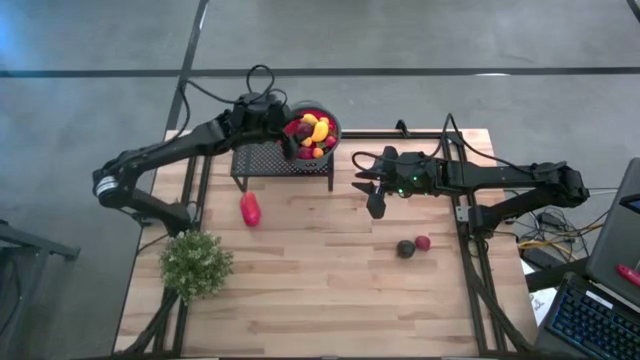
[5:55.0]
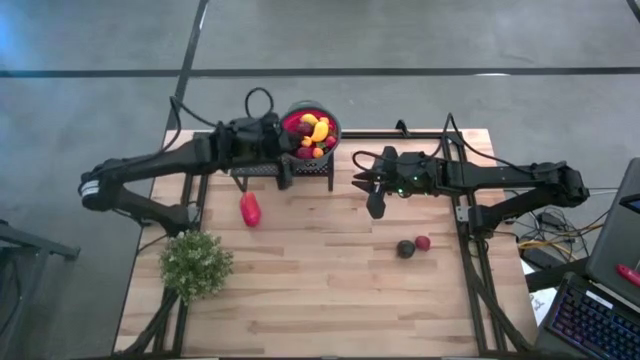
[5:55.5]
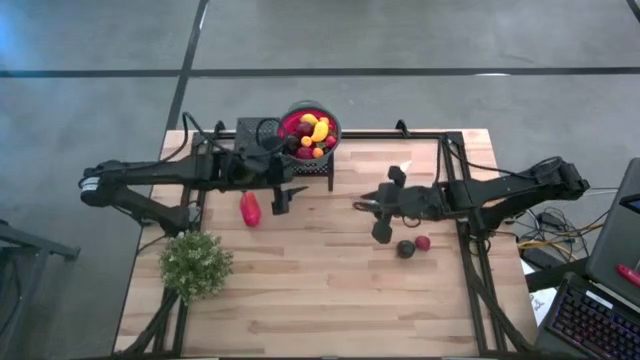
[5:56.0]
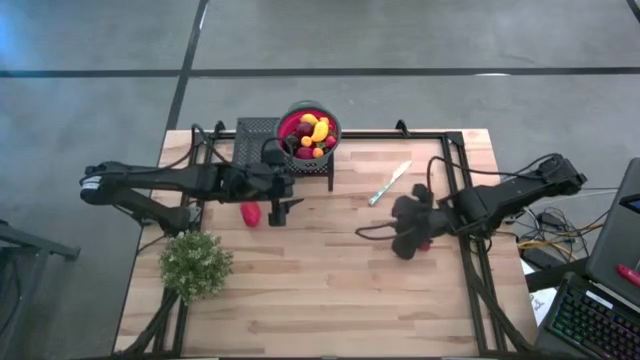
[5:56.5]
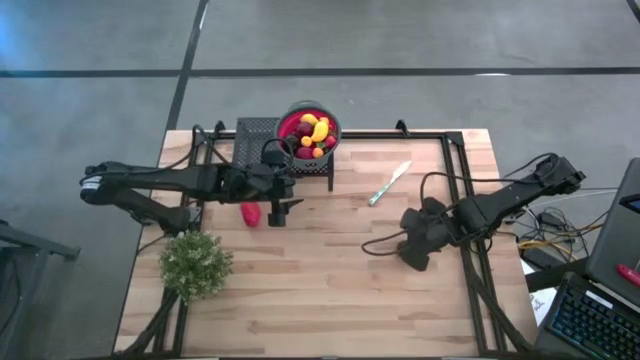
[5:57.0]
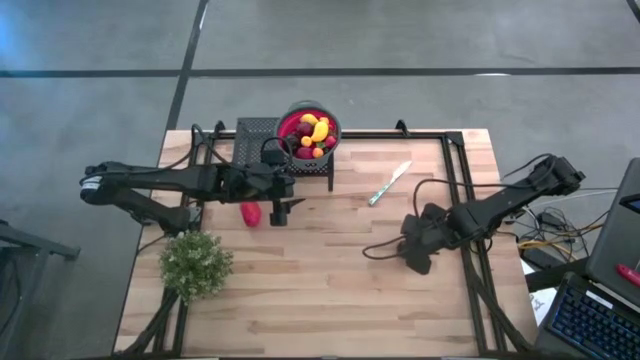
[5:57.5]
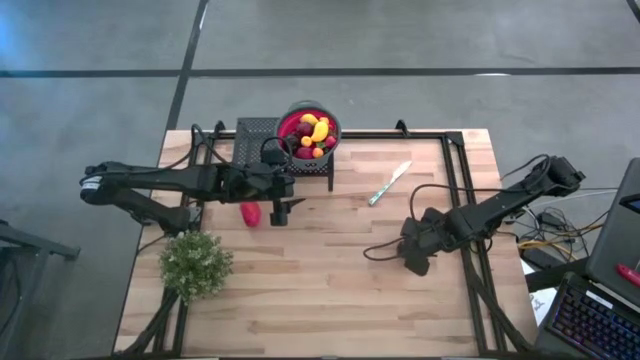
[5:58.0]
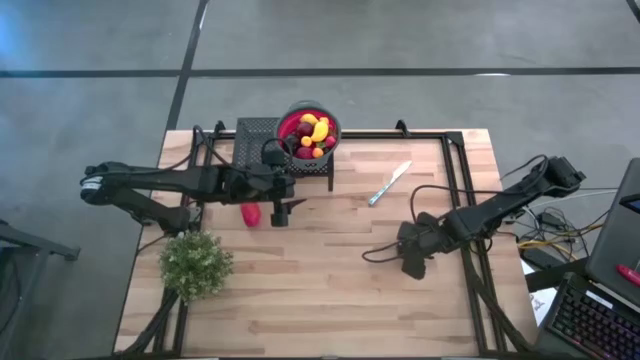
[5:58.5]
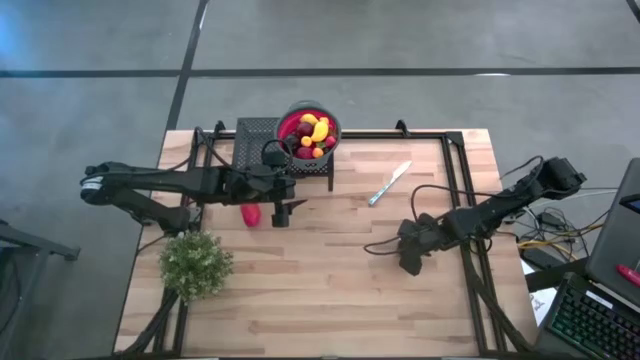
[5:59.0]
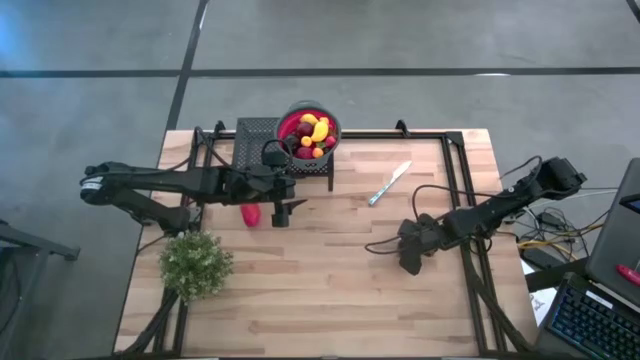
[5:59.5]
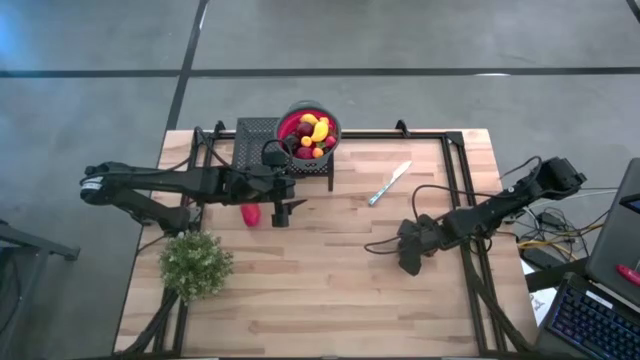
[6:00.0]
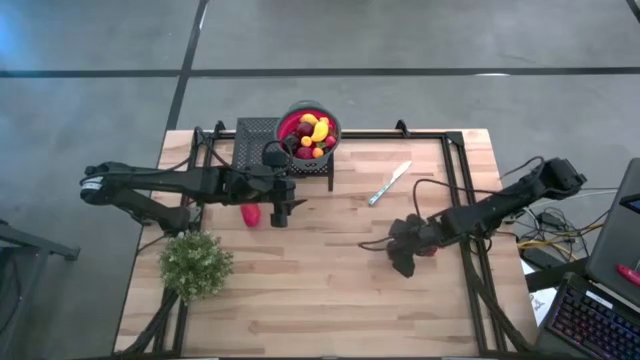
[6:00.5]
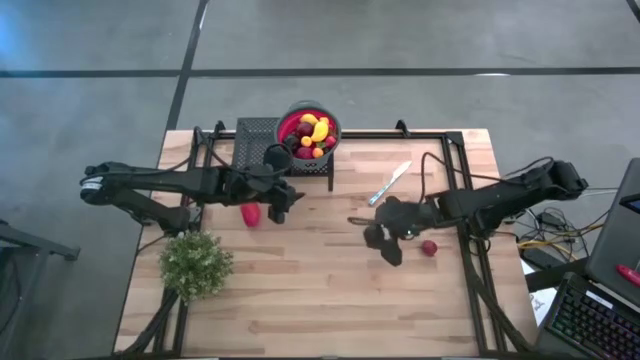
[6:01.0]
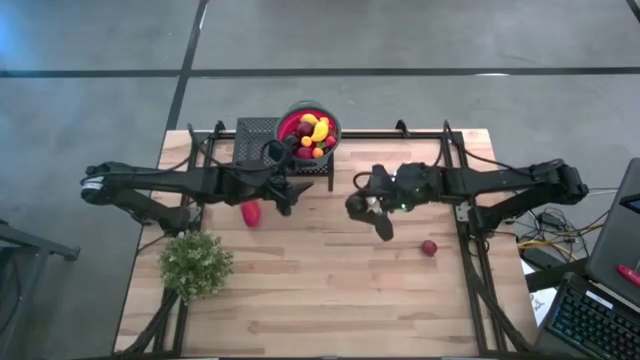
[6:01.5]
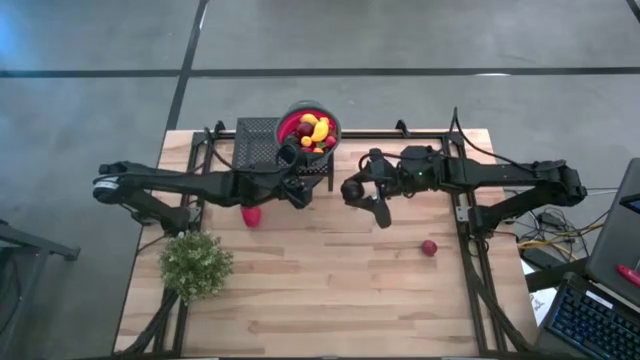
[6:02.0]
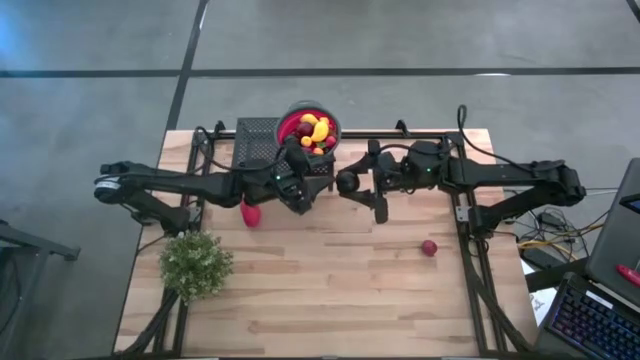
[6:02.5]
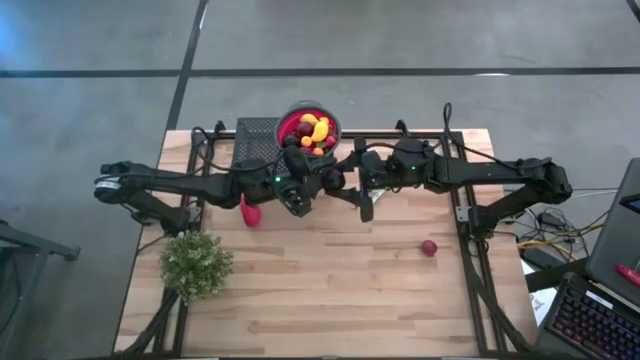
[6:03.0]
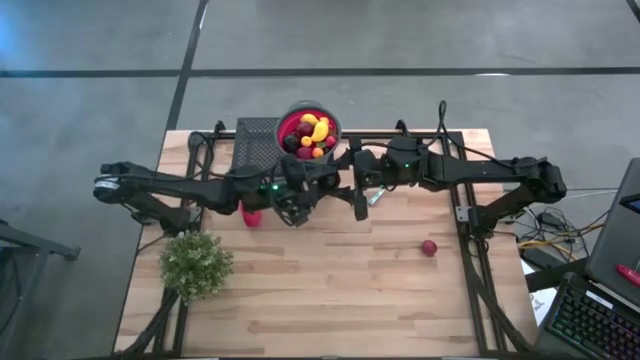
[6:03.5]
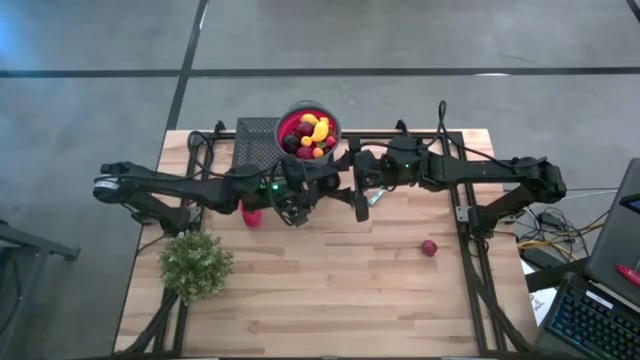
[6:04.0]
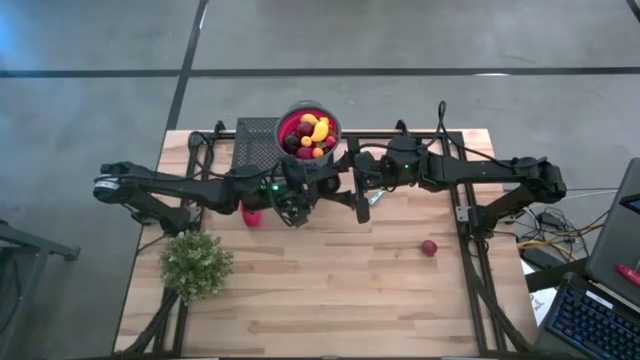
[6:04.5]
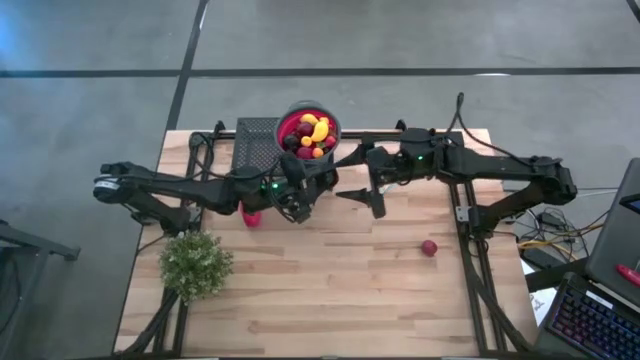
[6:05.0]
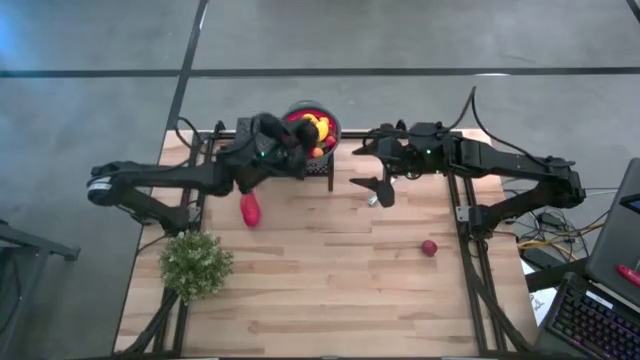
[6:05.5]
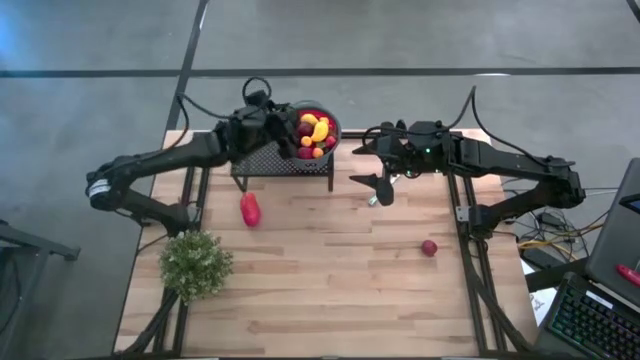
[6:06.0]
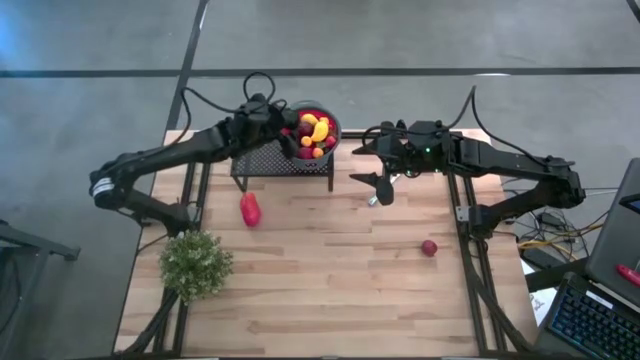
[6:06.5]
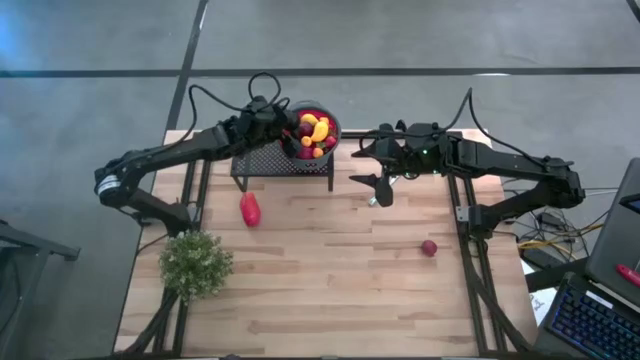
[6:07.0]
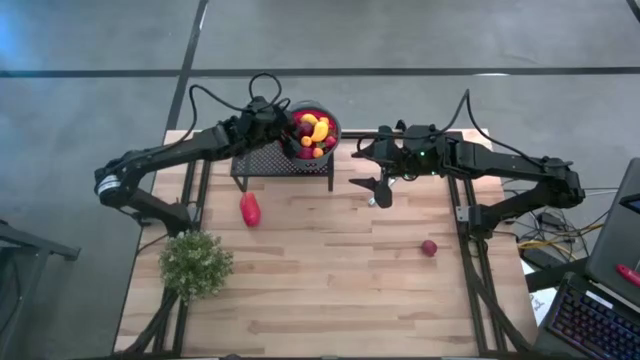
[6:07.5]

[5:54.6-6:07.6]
Task: Pick & Place Fruit
Put the black plum into the red gray strainer bowl on the shelf

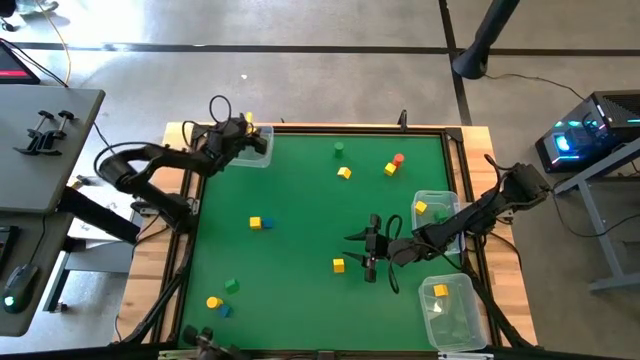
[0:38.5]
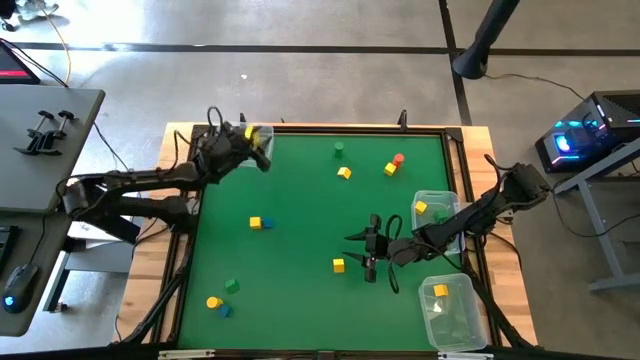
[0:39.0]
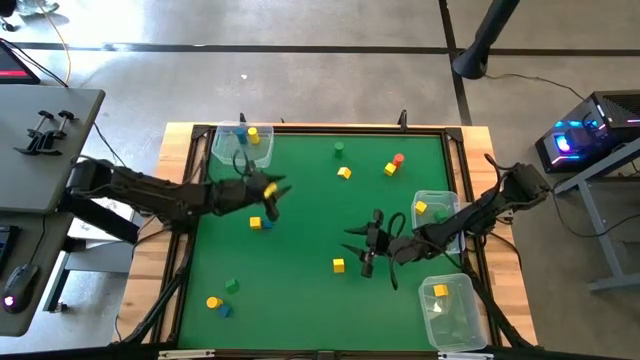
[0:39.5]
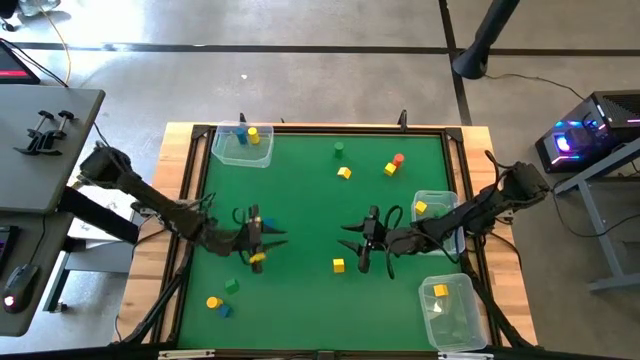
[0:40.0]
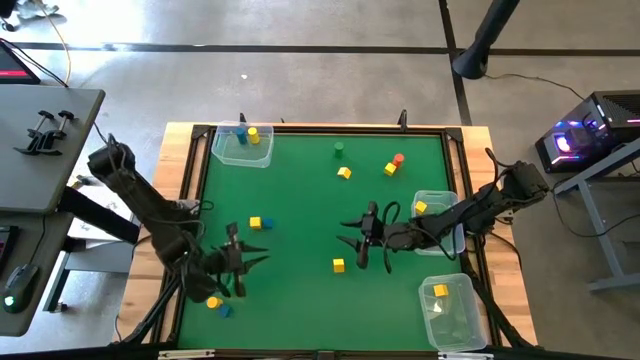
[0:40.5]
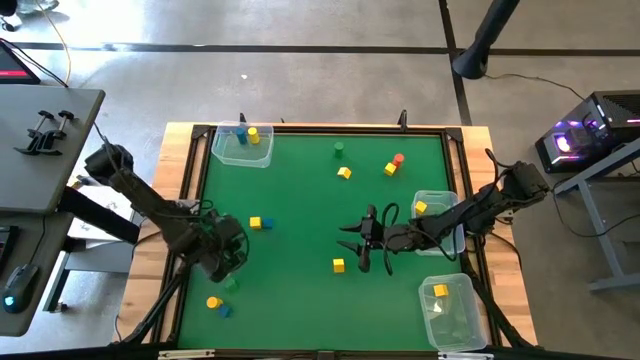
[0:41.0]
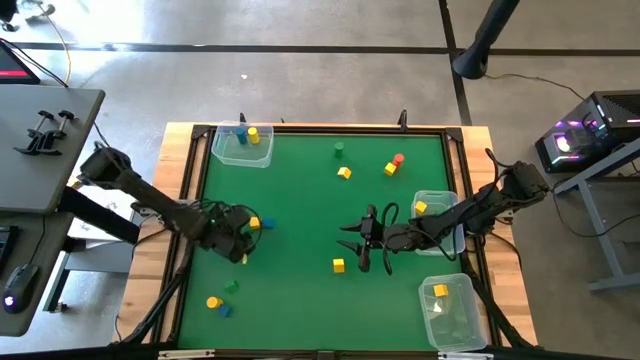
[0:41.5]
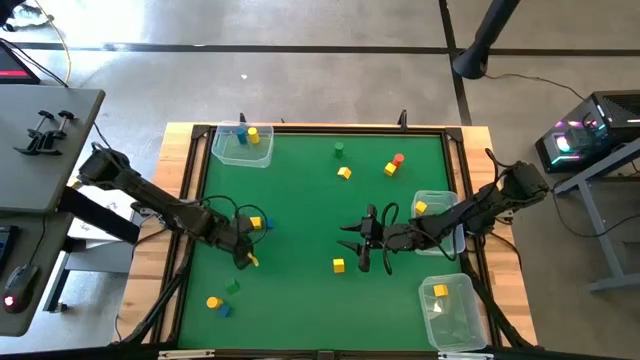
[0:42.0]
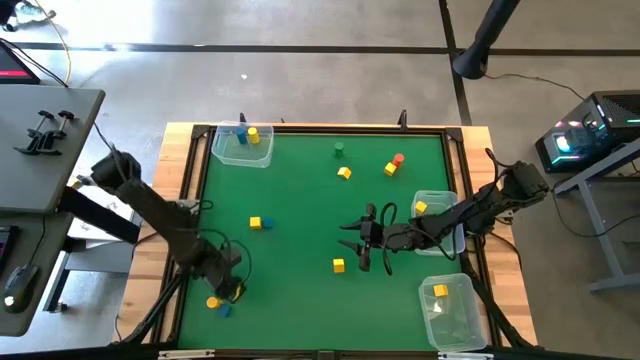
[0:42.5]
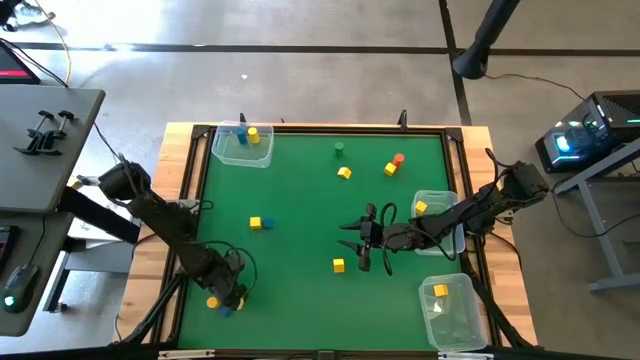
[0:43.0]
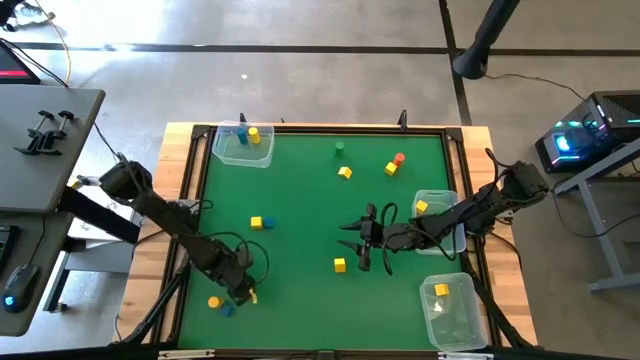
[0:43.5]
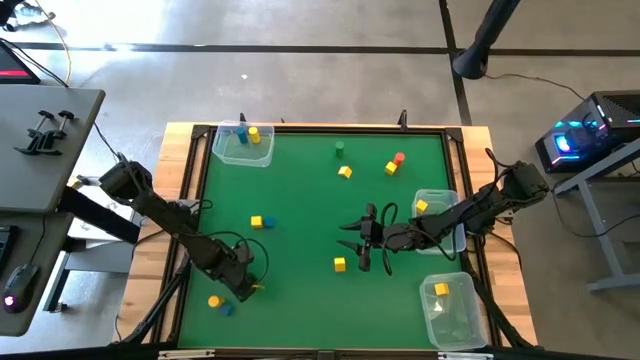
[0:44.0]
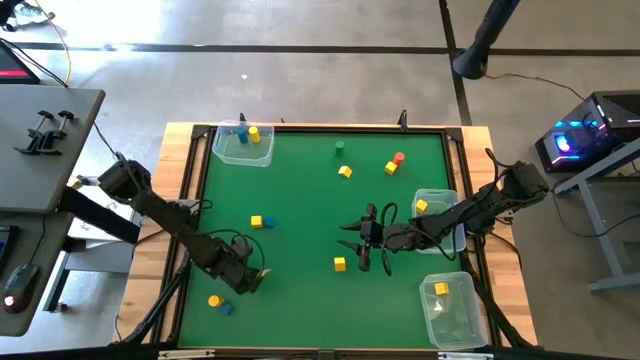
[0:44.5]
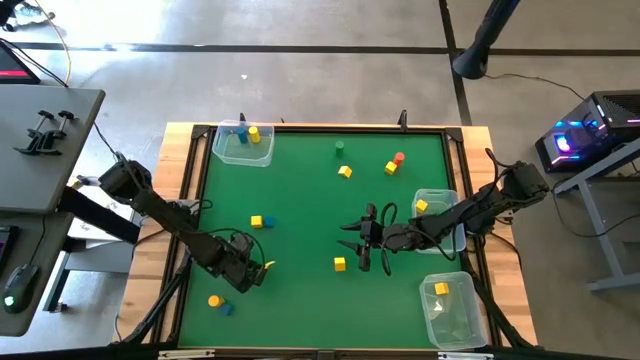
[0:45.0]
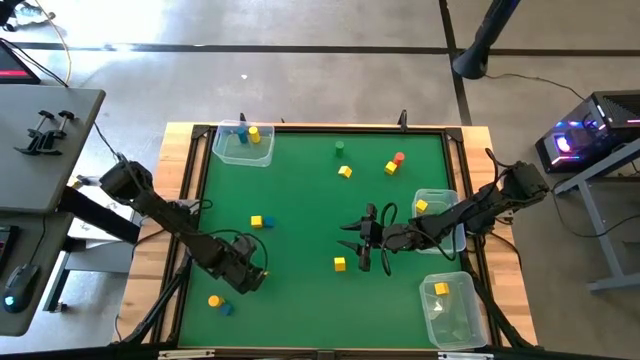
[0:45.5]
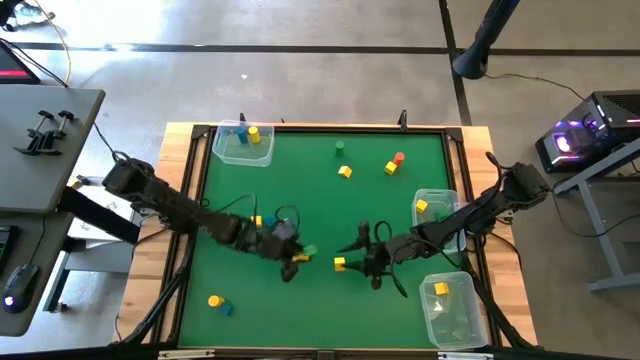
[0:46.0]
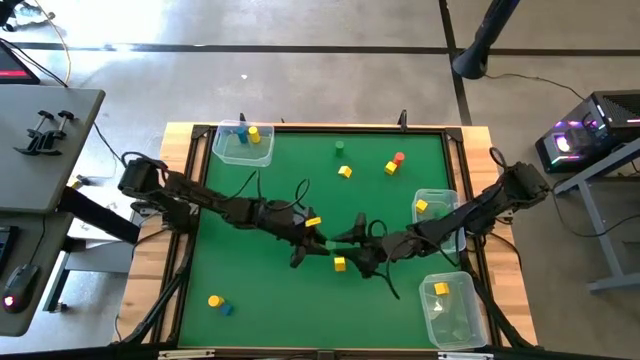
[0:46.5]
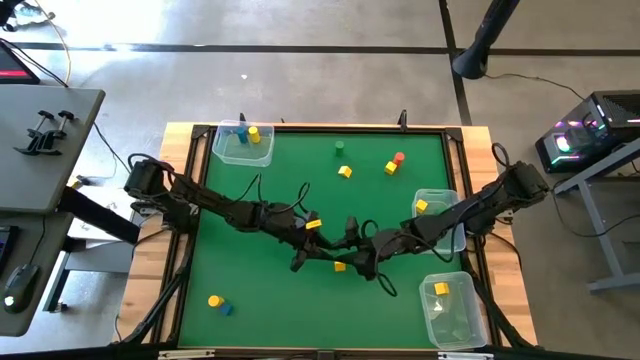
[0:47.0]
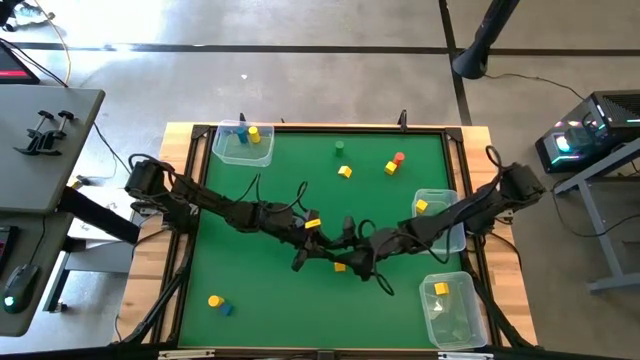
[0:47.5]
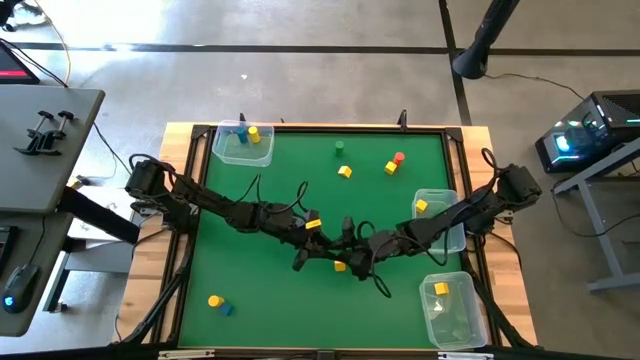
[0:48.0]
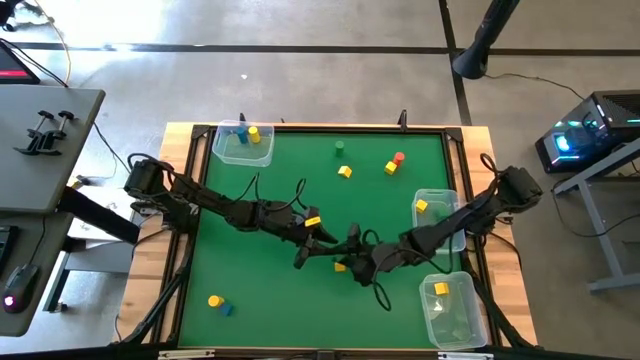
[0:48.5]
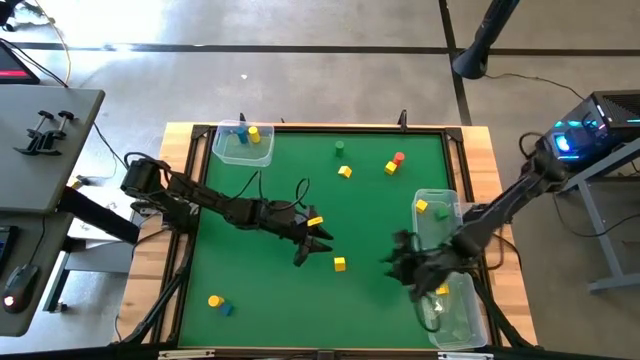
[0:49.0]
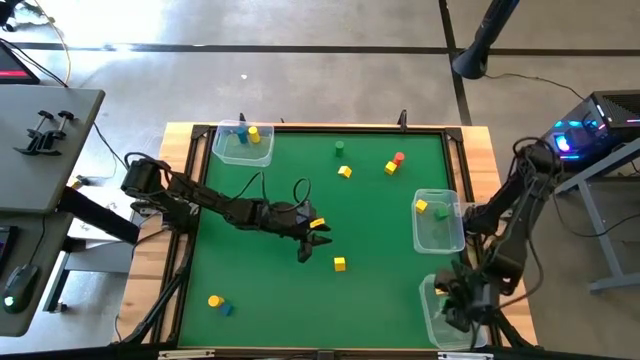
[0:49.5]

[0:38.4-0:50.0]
Task: Sort blocks by size
Put the green triangular block into the bottom transparent bin
